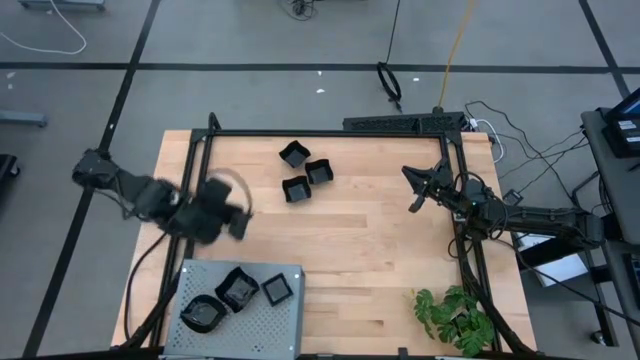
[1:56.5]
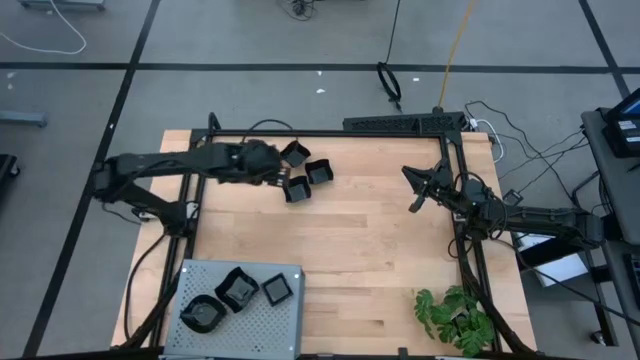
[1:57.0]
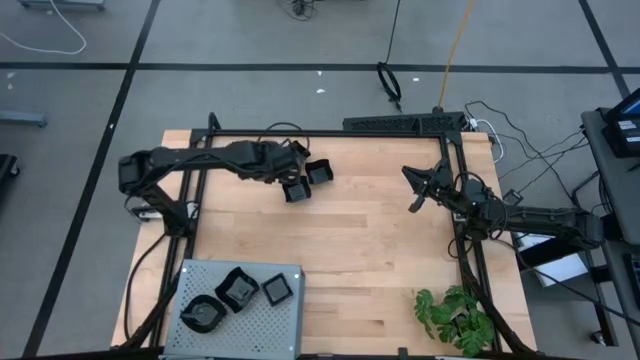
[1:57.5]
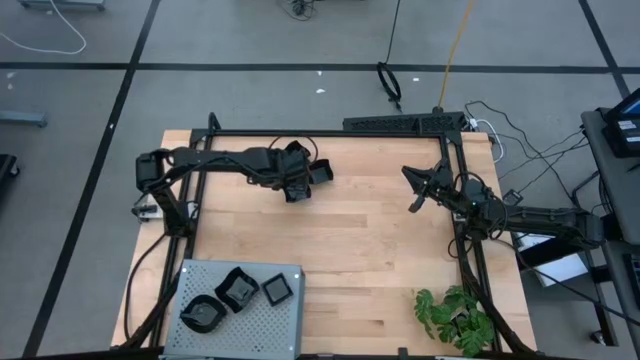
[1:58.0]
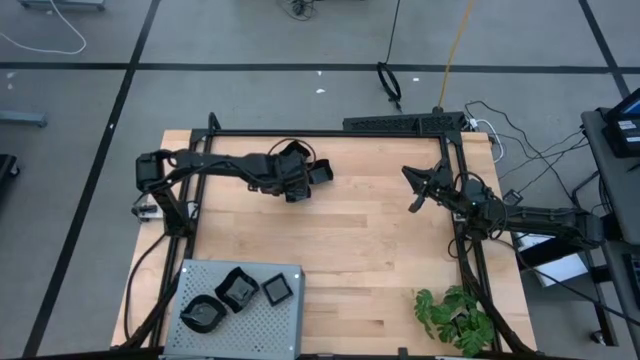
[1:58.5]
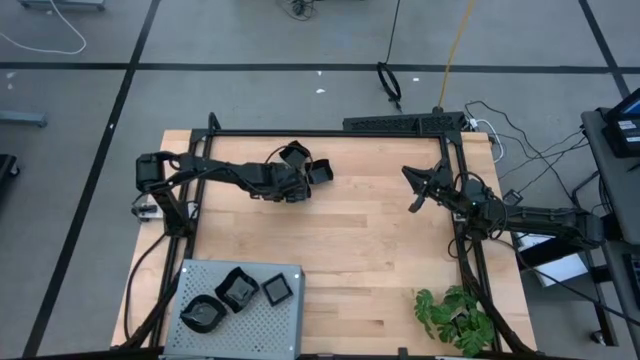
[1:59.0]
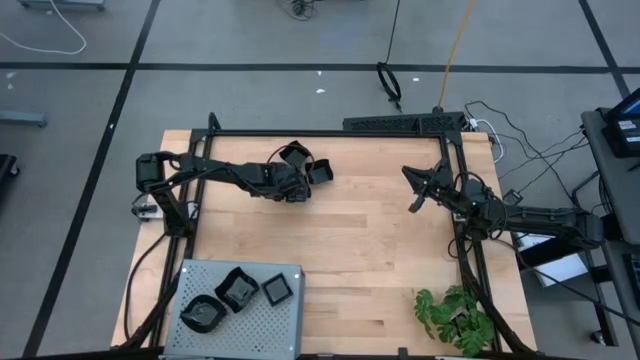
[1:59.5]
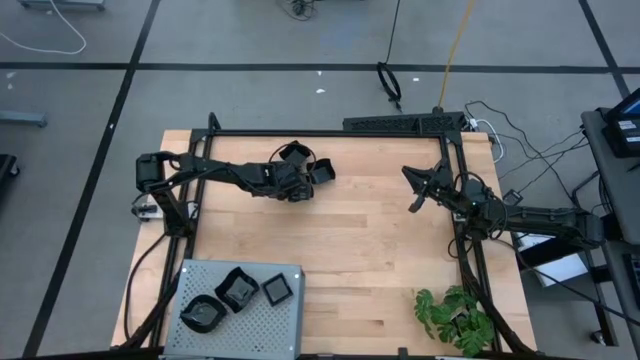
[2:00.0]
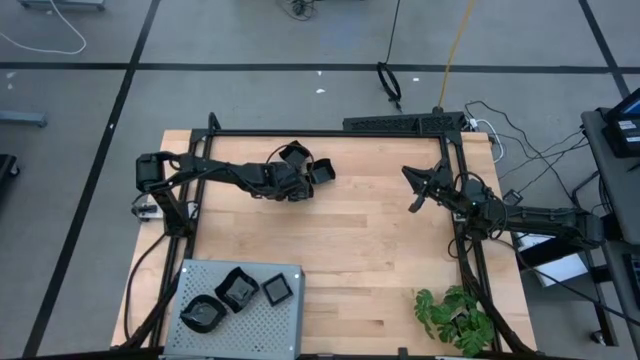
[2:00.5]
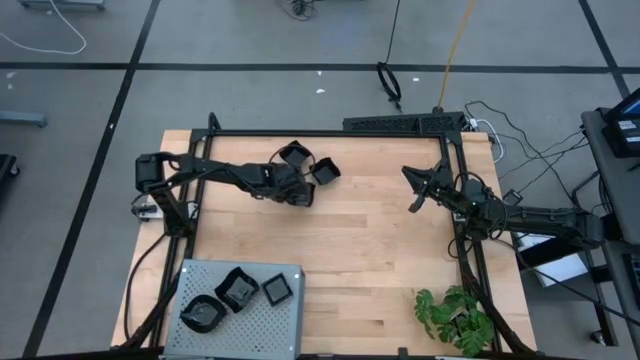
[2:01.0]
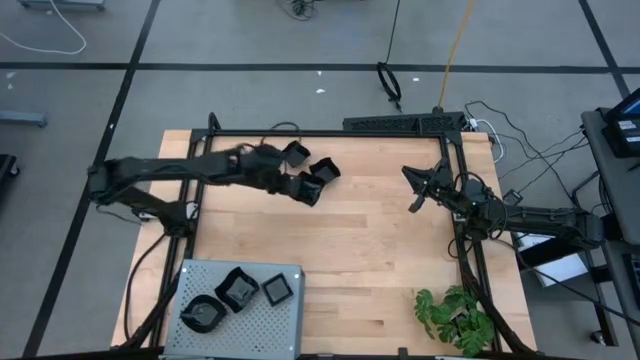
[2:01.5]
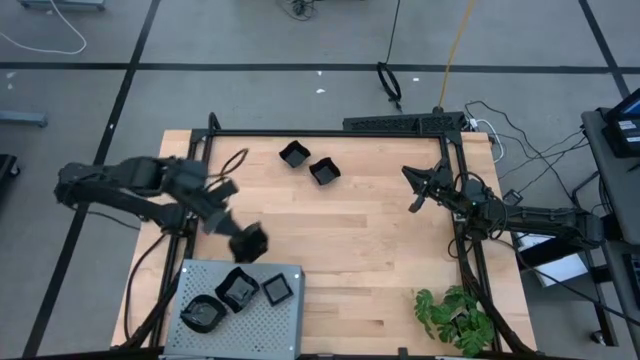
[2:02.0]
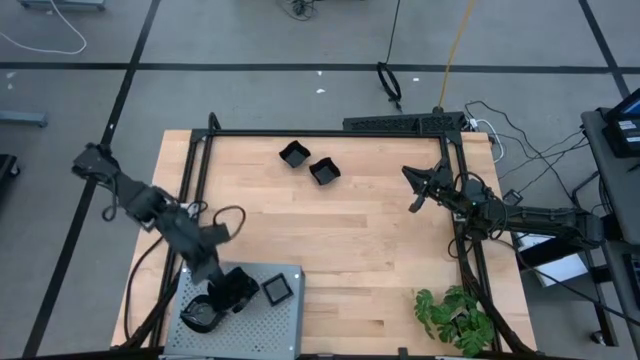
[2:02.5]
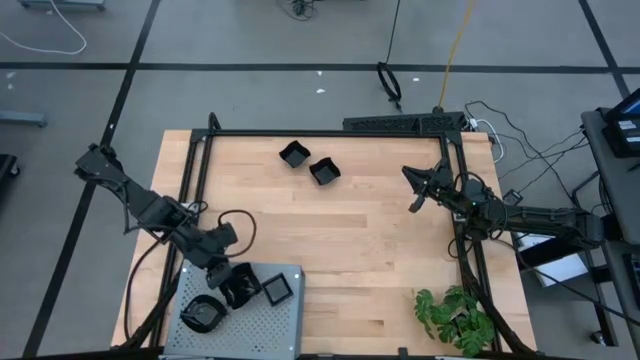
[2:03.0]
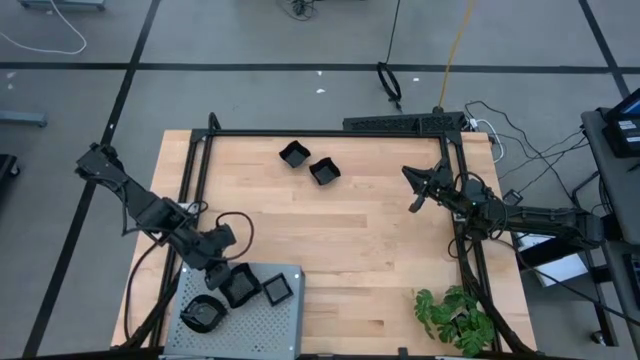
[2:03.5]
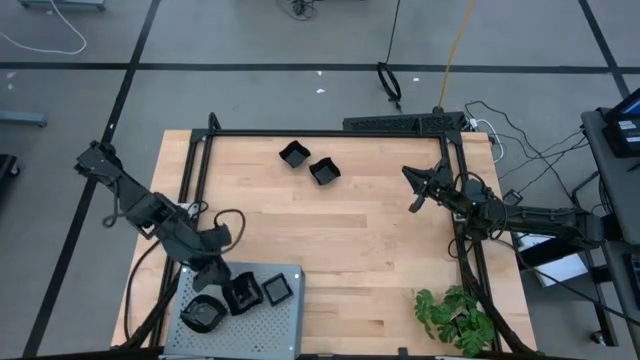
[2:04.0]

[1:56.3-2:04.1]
Task: Pick & Place Mini shaped plates
Stack the distorted square plate on top of the other distorted square plate on the shelf

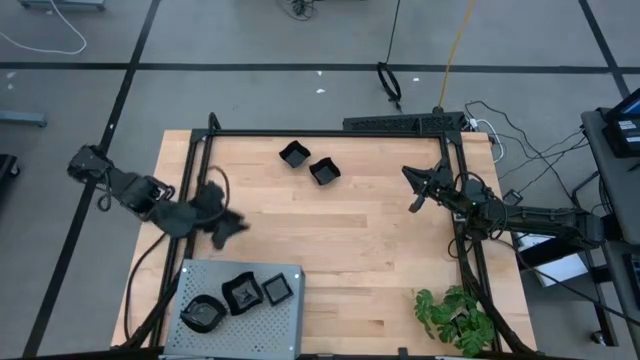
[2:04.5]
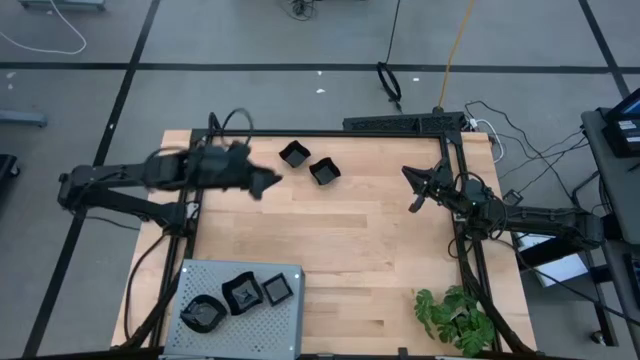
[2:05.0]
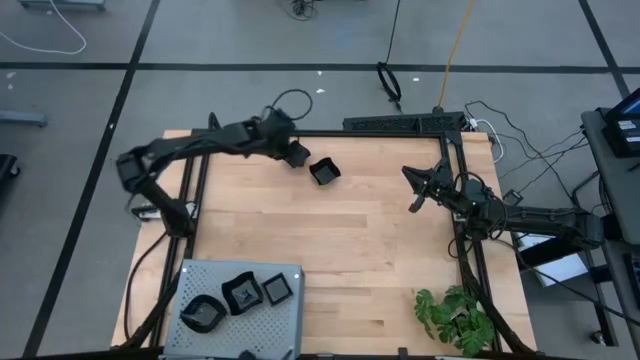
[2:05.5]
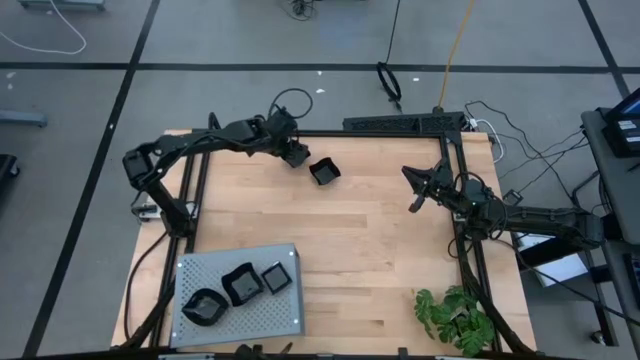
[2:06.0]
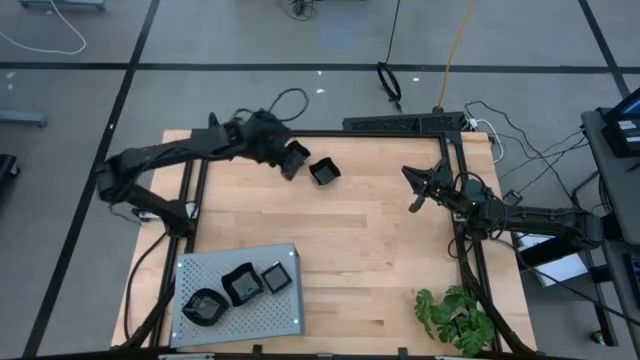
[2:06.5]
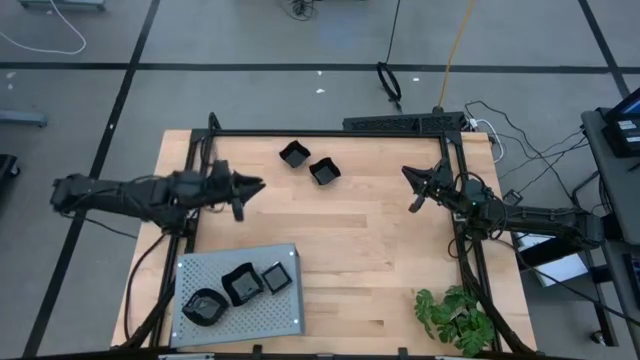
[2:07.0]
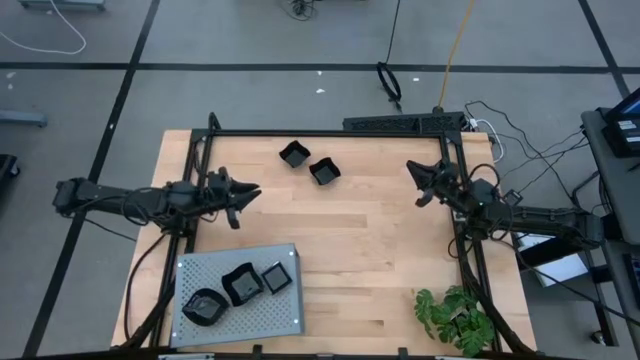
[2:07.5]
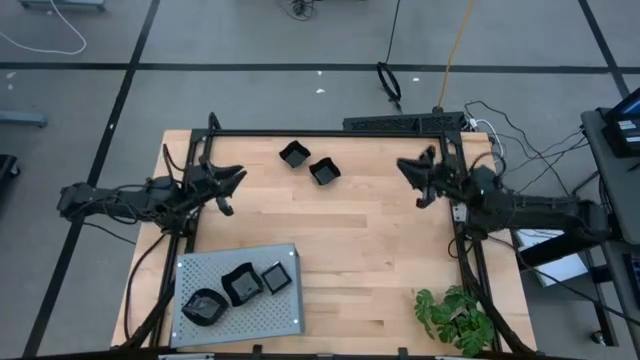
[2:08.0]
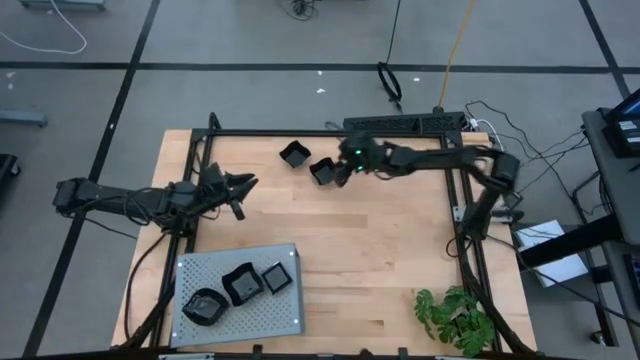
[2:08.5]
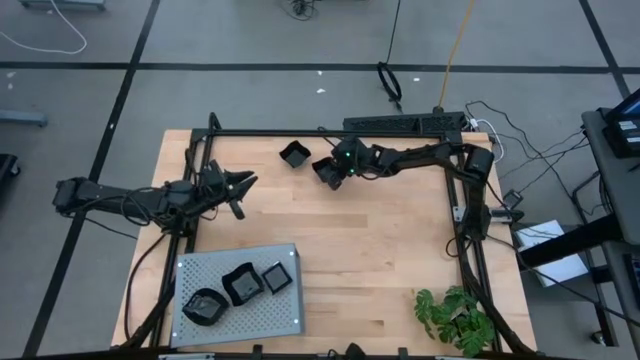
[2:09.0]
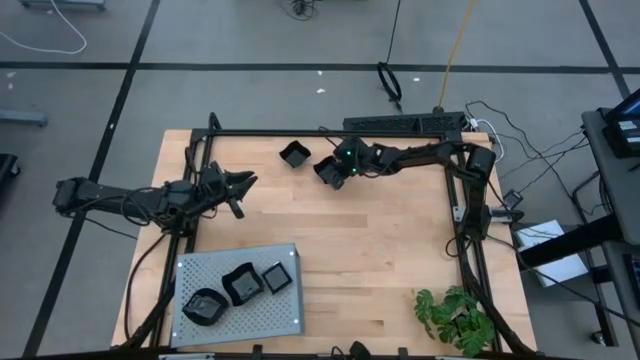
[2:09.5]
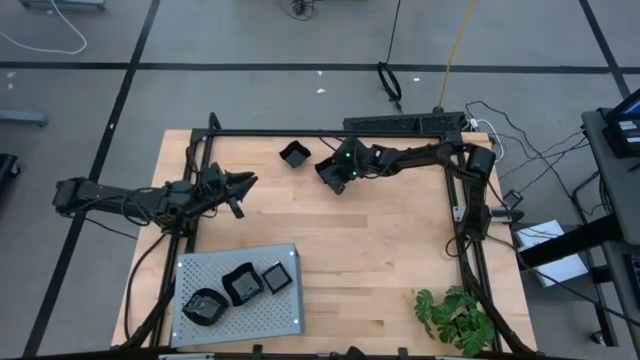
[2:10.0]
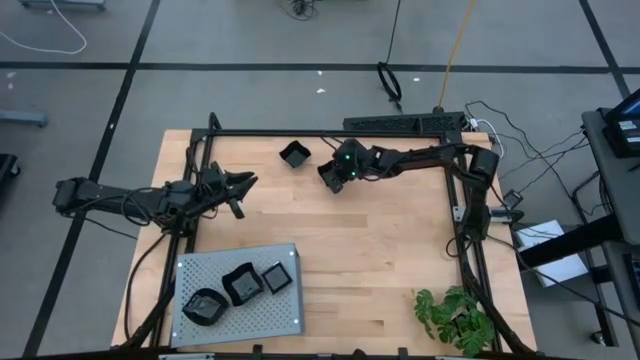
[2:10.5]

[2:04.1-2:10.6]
Stack the distorted square plate on top of the other distorted square plate on the shelf

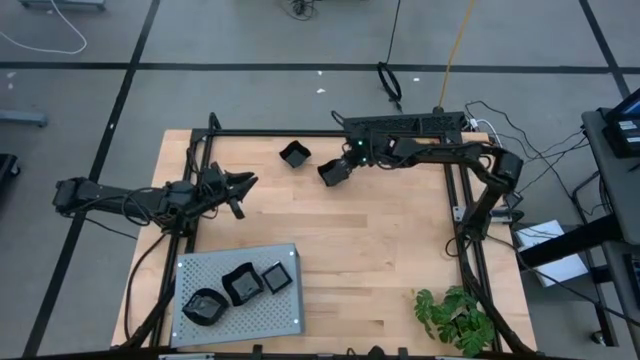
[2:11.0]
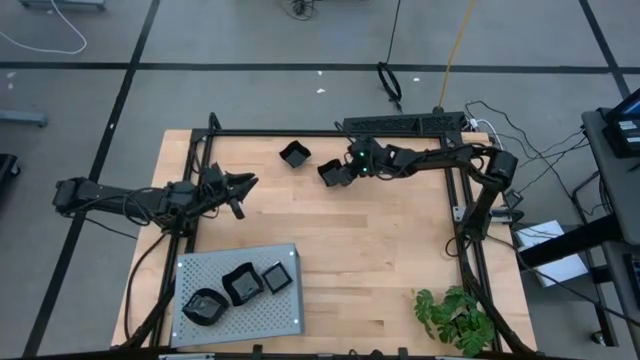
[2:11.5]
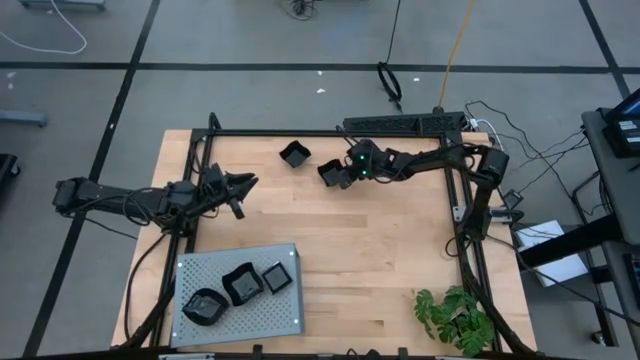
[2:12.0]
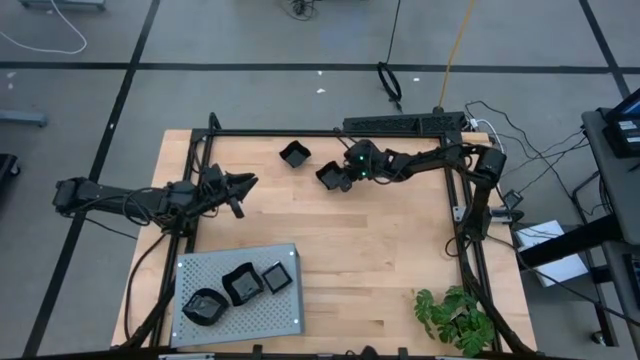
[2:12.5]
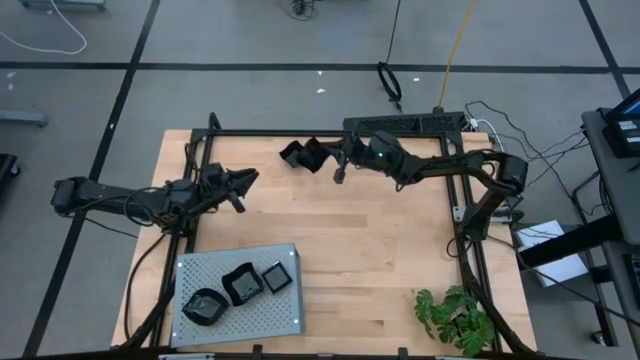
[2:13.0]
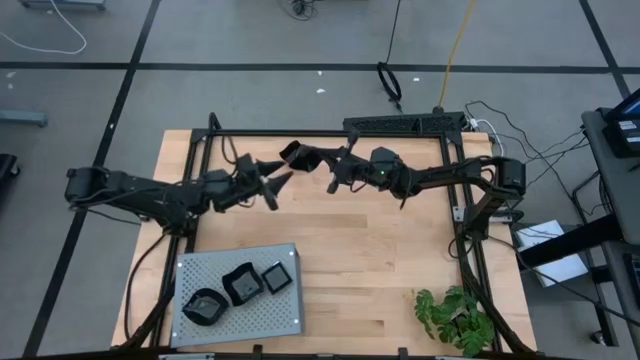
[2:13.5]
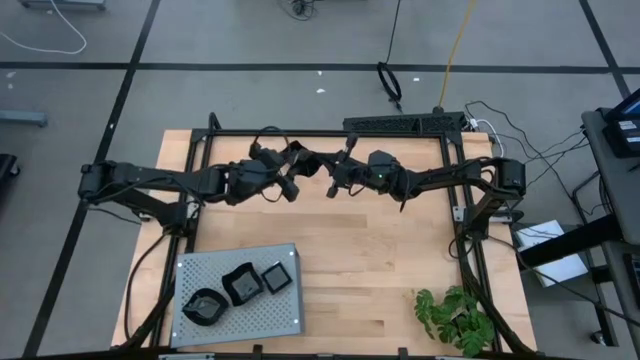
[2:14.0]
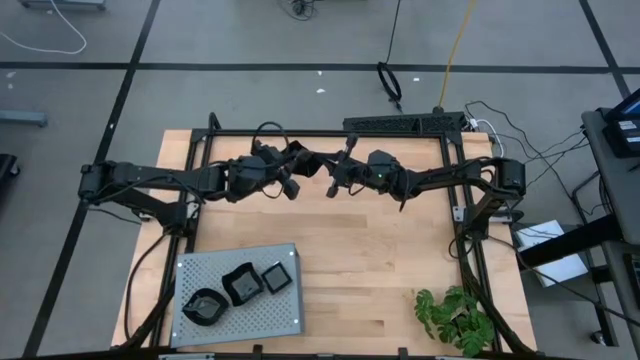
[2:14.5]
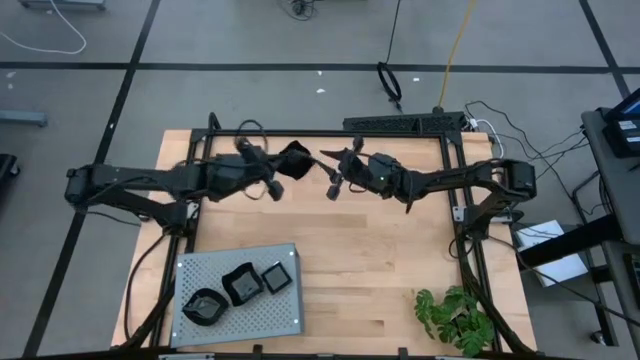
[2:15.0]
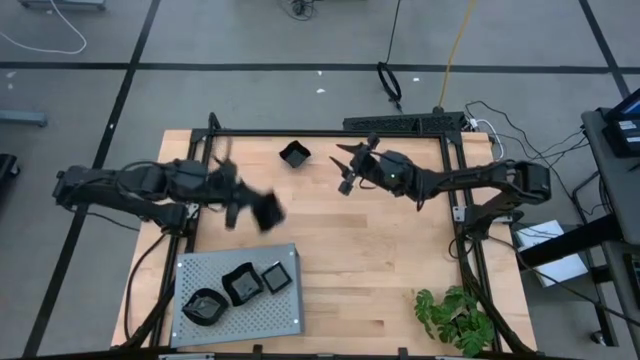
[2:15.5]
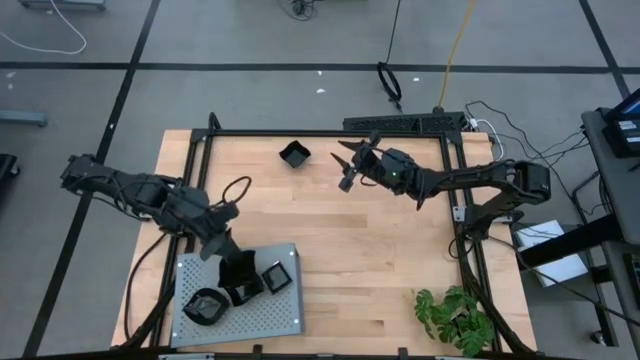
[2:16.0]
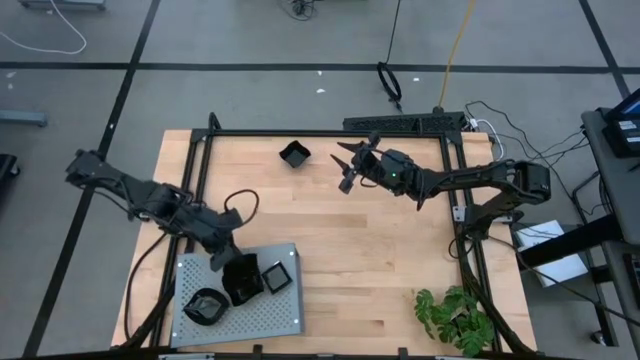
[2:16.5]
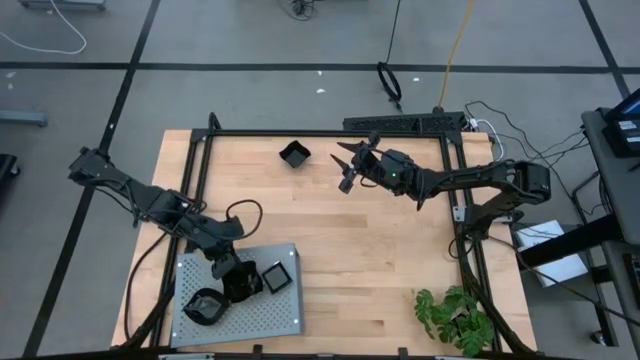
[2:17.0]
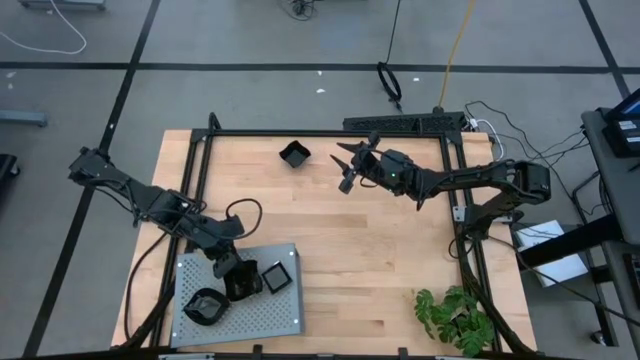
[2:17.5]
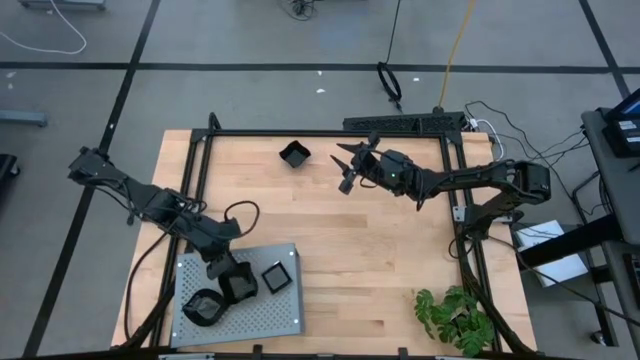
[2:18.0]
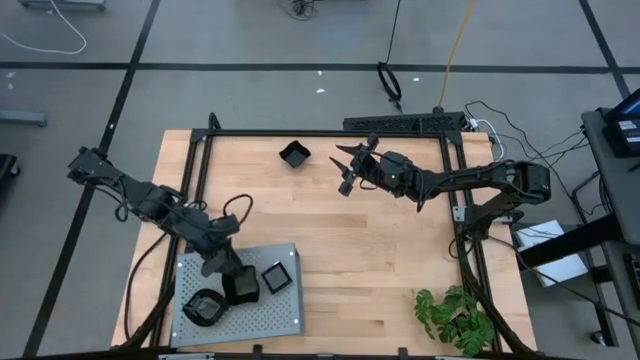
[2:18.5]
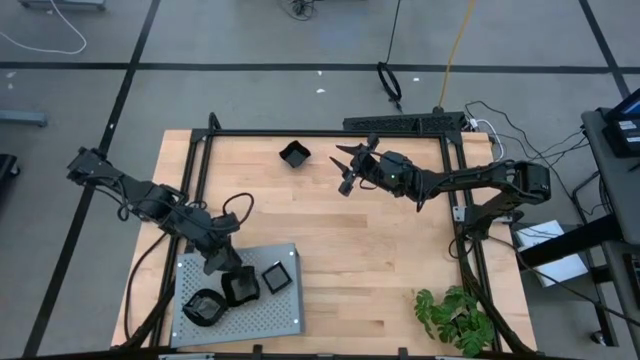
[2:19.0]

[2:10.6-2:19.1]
Stack the distorted square plate on top of the other distorted square plate on the shelf
